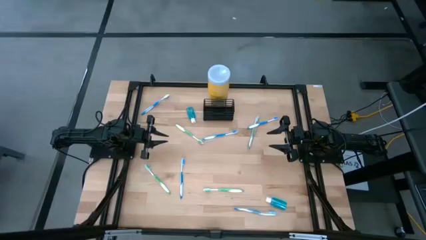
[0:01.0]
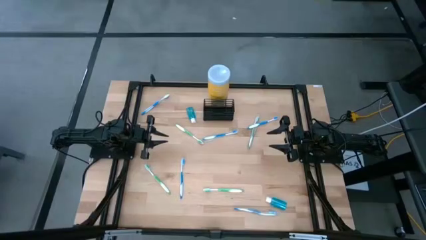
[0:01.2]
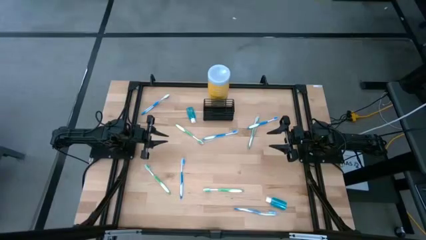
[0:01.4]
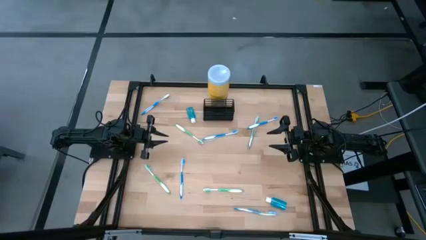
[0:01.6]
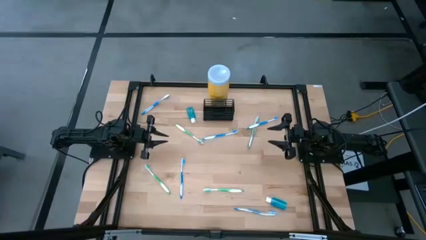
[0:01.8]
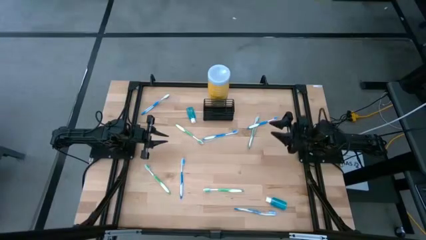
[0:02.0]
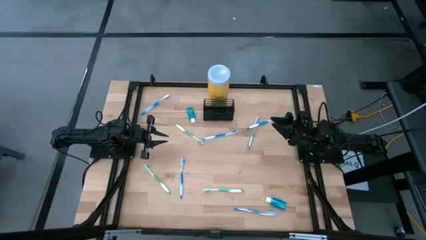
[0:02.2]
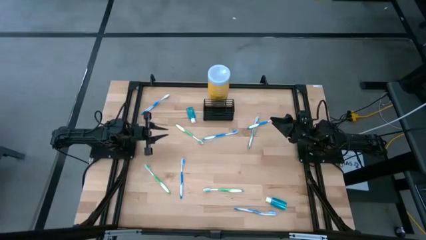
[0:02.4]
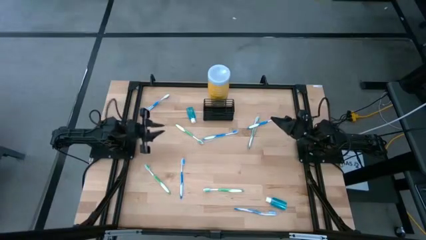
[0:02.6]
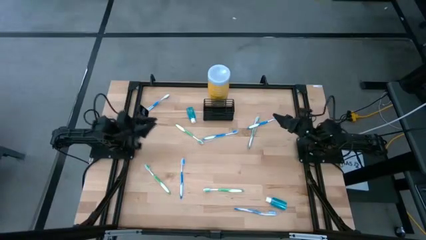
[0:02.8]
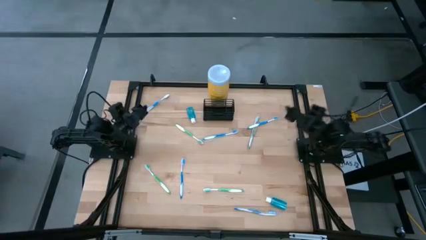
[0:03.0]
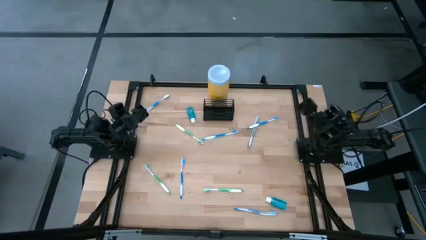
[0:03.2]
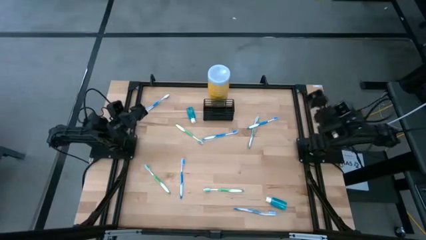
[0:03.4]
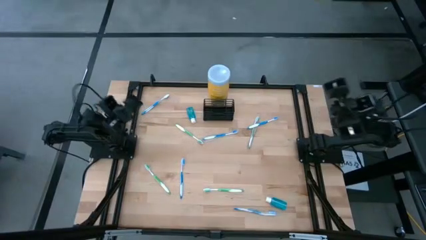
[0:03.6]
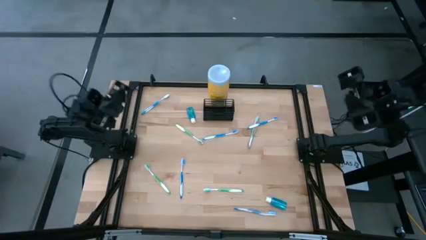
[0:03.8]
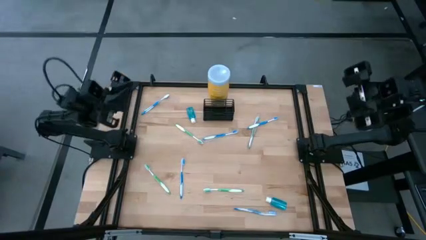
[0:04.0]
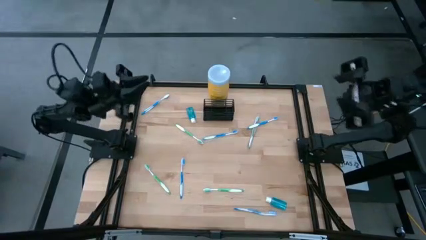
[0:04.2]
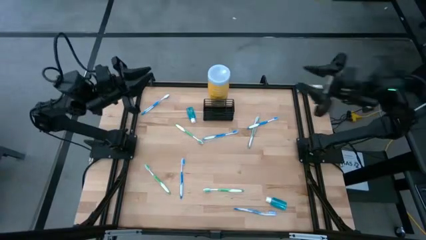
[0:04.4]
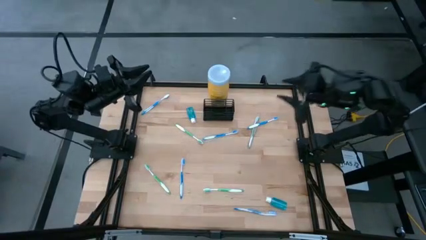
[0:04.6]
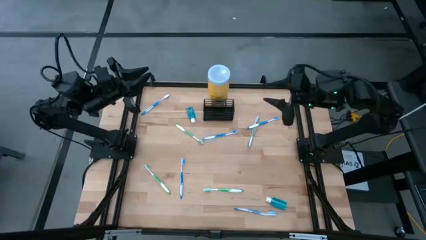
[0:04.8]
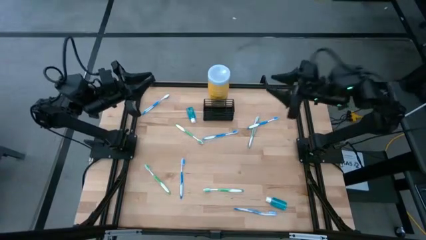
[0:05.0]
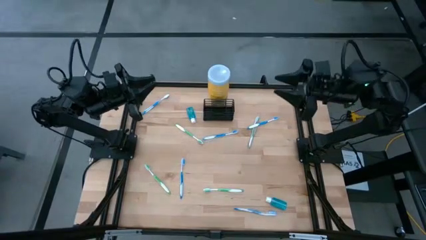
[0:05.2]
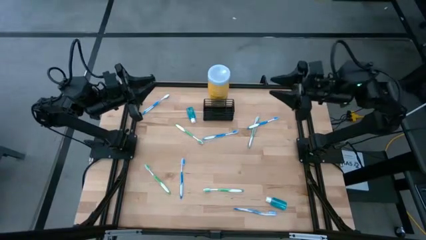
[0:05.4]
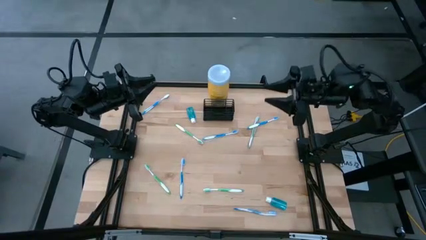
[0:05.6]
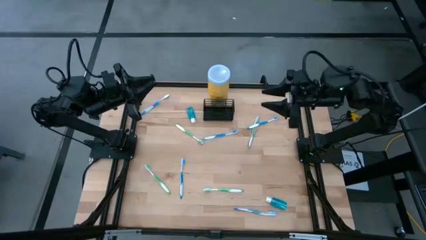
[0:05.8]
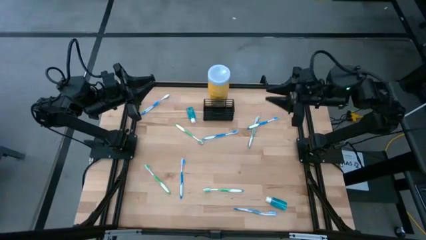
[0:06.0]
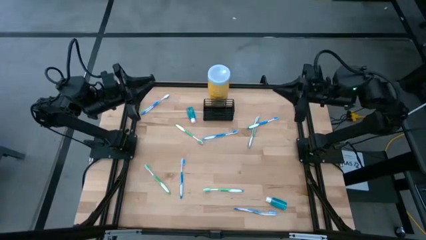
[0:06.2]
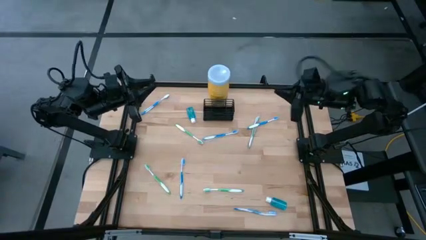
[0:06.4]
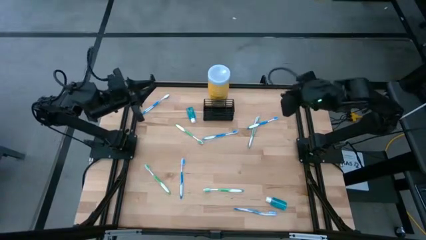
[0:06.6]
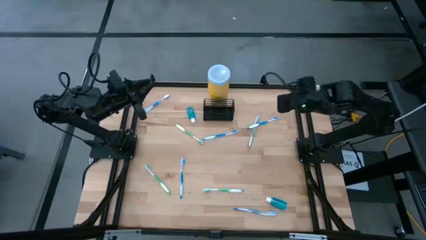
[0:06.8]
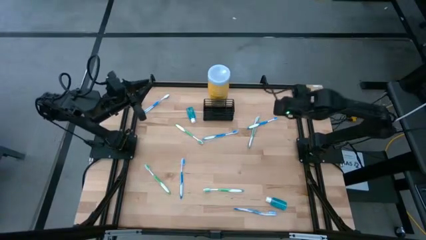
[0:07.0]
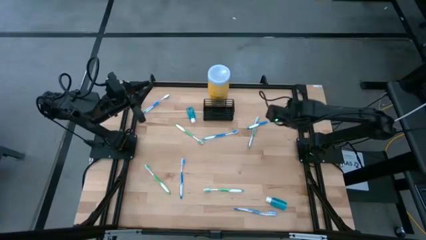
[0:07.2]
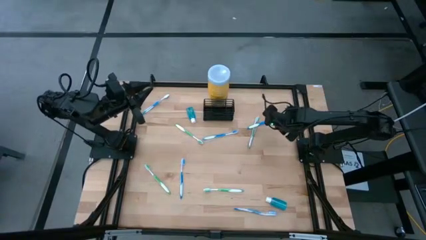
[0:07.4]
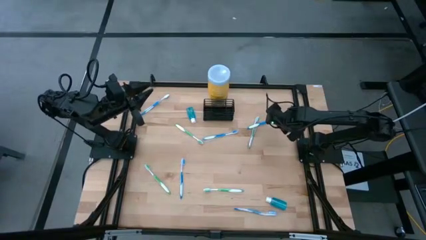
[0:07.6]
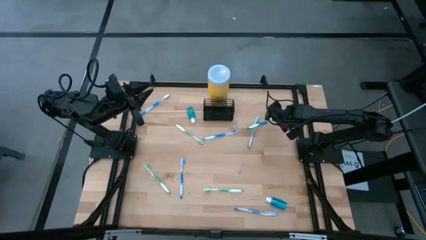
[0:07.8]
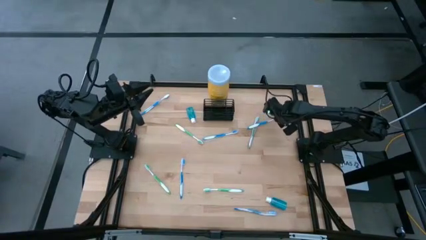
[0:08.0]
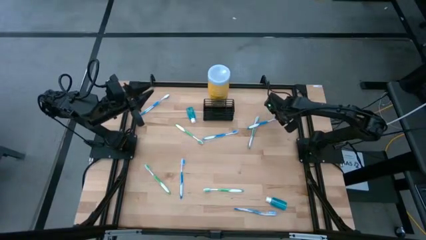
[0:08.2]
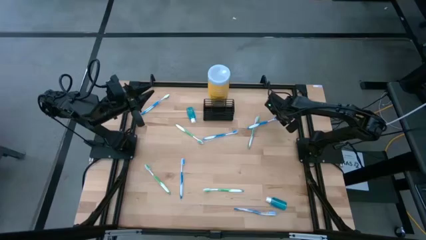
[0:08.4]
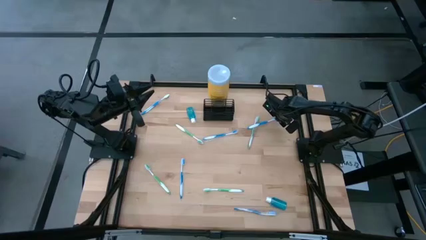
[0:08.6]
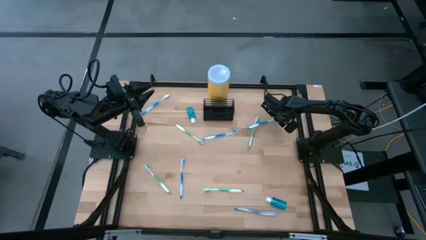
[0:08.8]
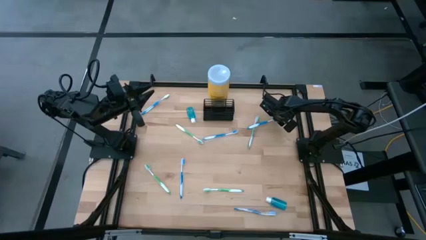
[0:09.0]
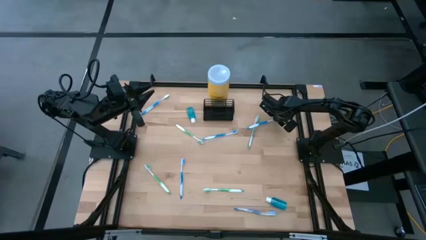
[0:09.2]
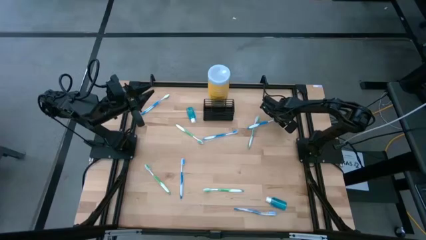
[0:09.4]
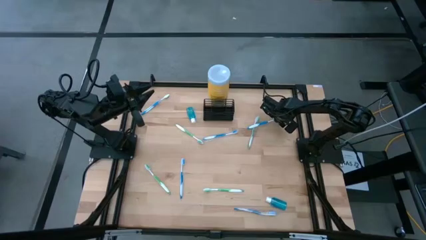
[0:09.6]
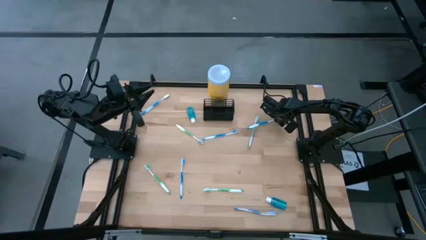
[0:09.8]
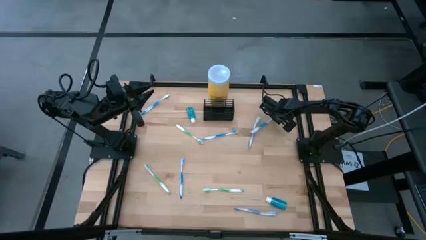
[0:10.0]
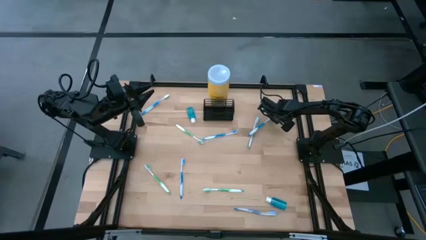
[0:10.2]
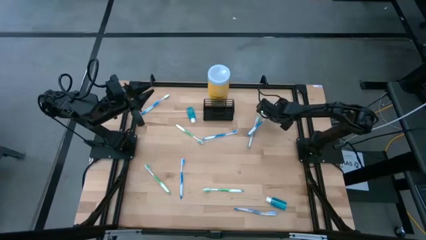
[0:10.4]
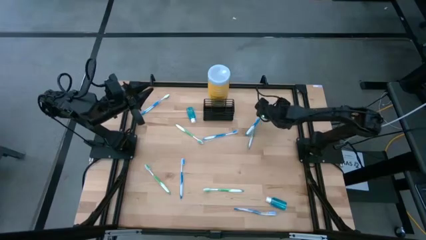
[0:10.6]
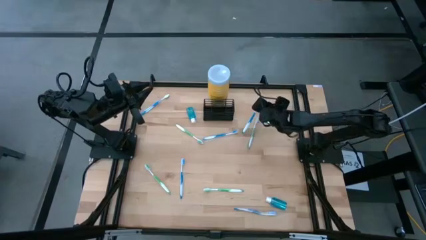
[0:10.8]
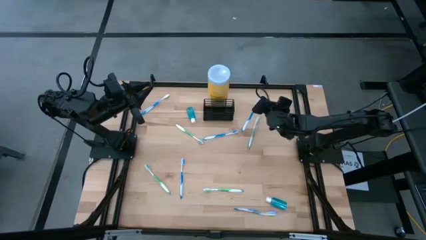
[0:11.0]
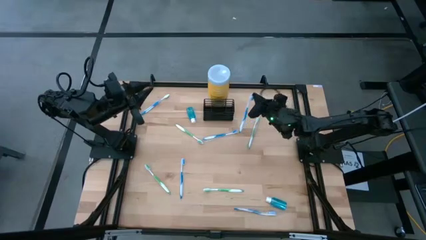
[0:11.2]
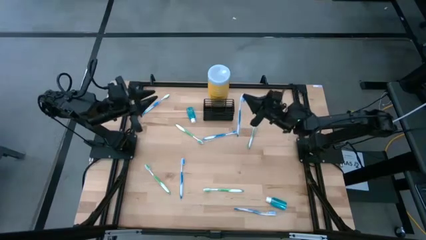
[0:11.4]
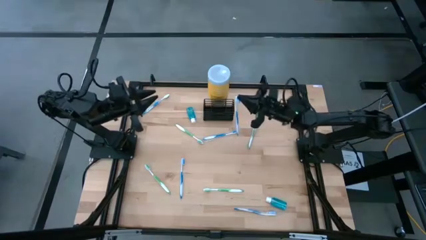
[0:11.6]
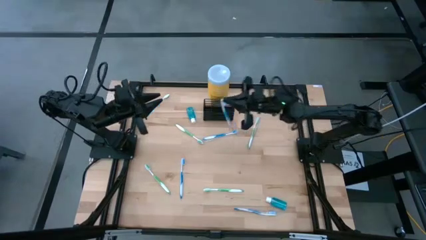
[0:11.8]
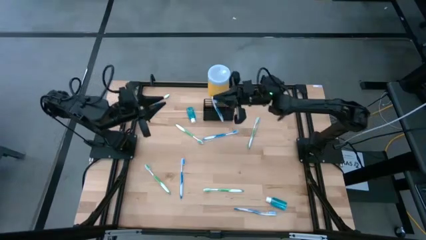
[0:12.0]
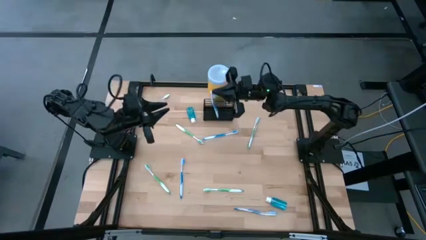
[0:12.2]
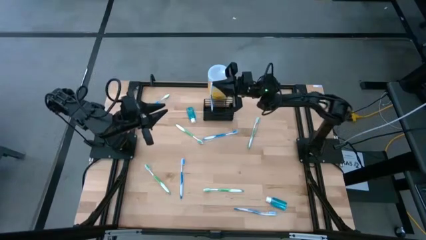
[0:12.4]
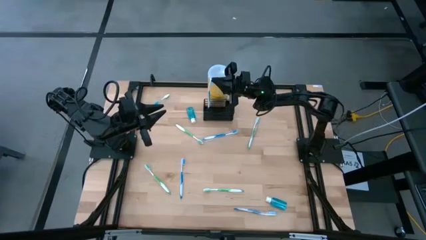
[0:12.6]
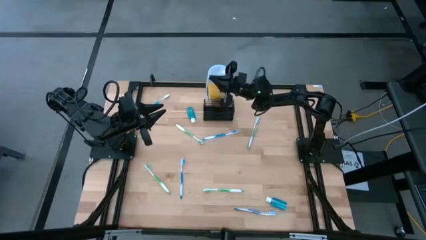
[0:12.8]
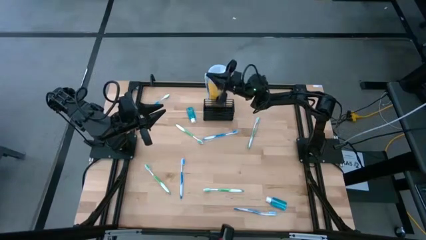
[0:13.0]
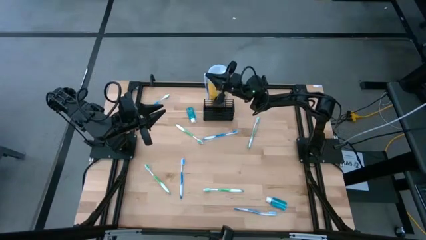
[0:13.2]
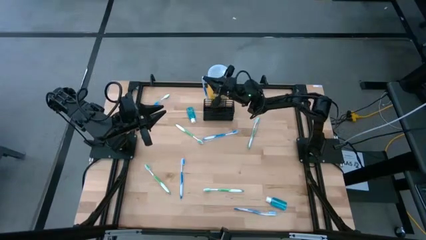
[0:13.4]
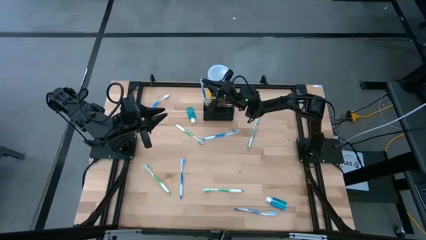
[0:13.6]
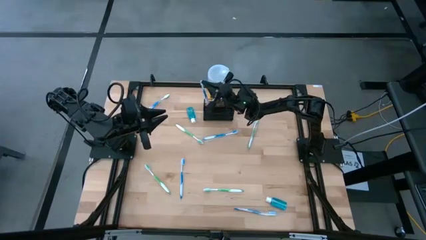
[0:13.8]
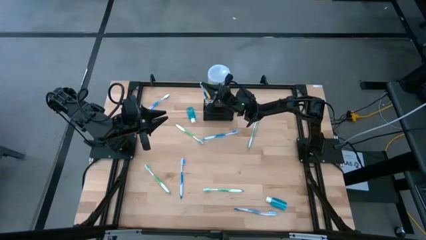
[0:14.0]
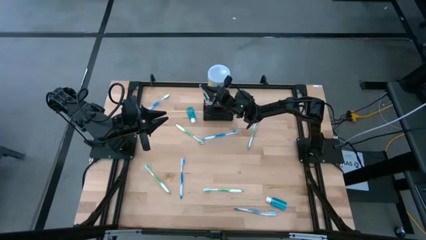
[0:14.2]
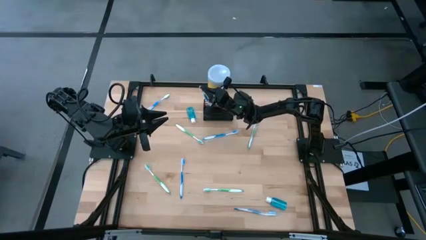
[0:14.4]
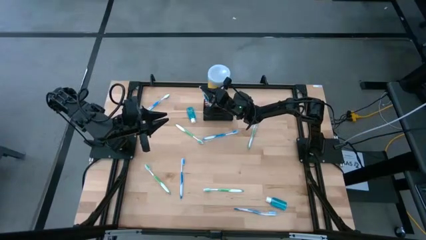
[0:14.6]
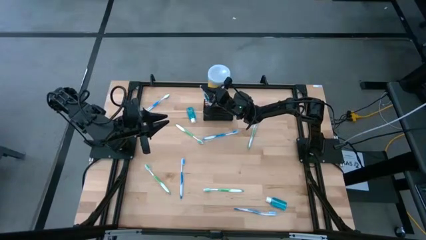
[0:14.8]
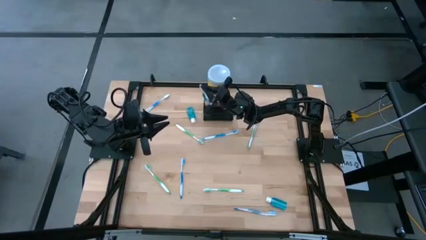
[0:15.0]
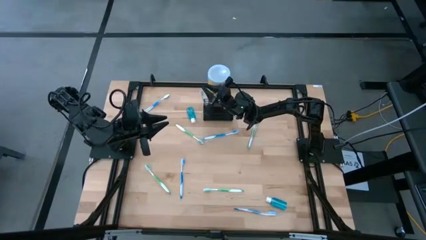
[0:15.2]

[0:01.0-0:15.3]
Task: Pick & Place toothbrushing station
Put the blue toothbrush in the wire organizer
